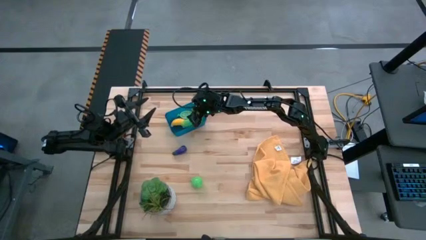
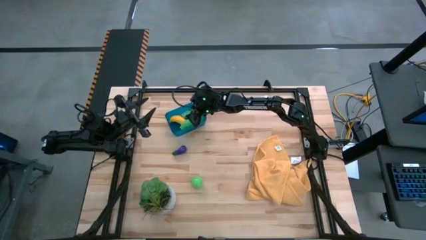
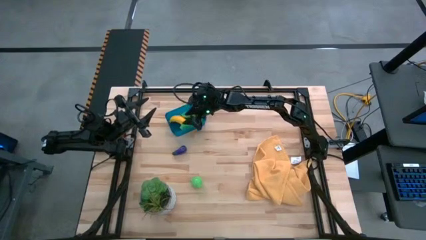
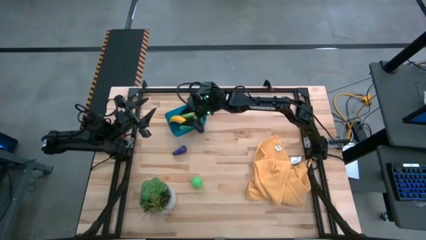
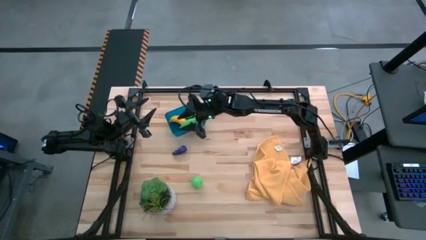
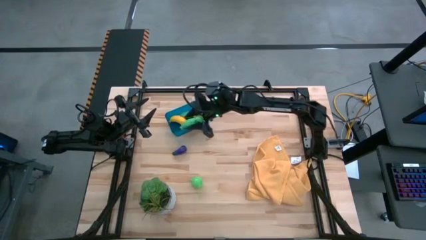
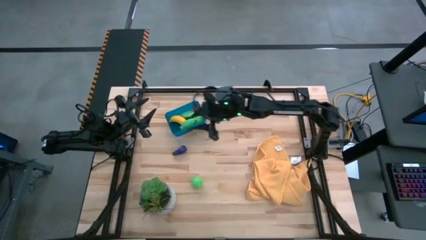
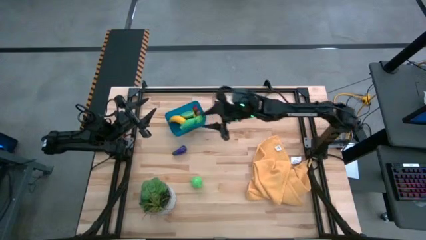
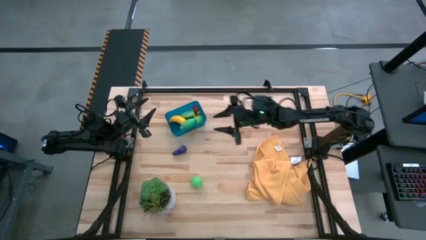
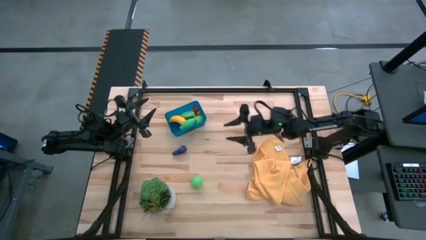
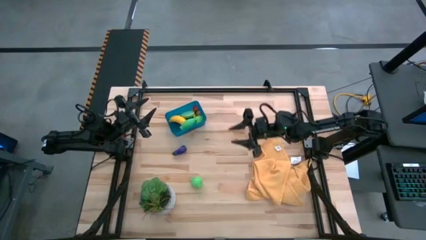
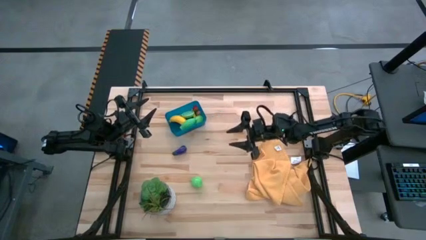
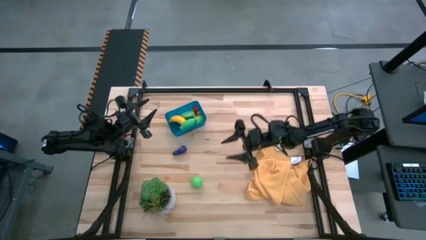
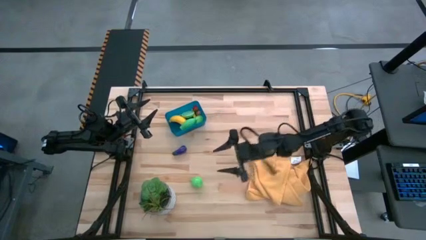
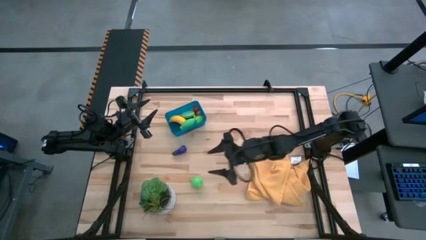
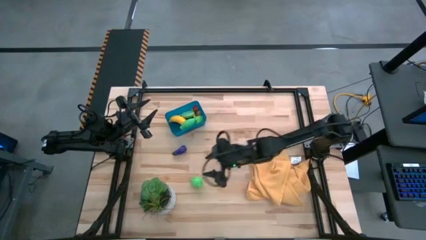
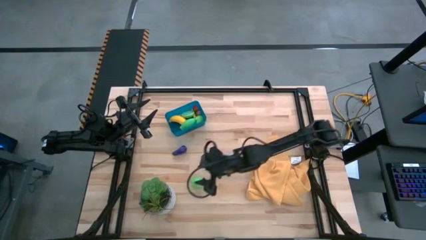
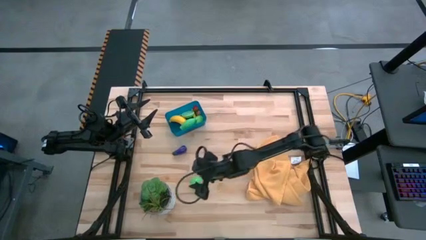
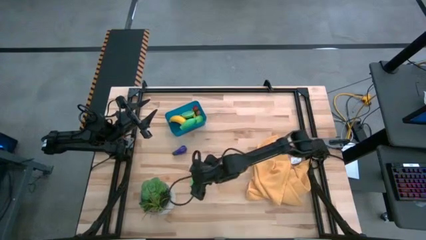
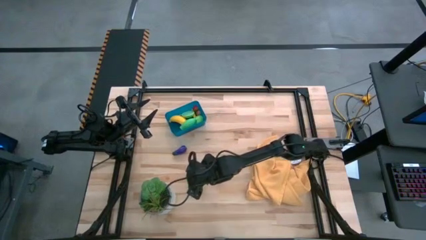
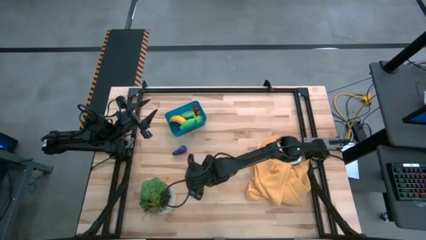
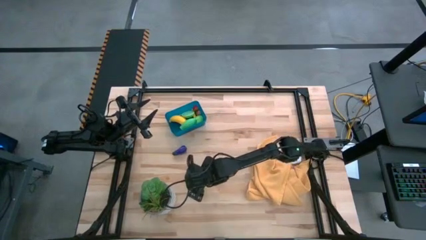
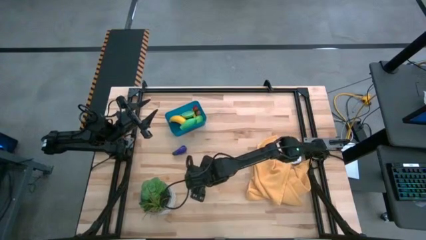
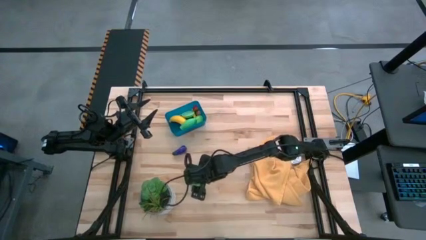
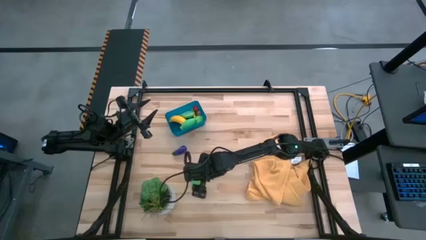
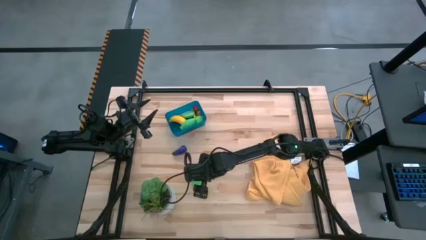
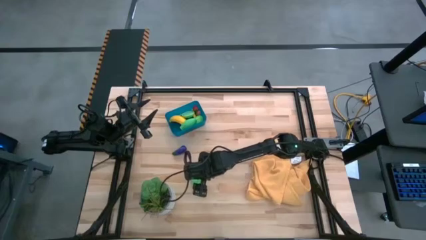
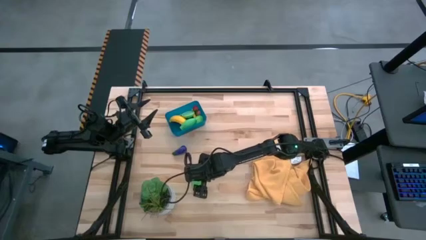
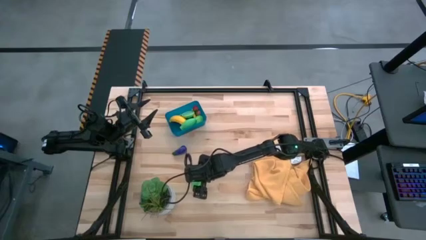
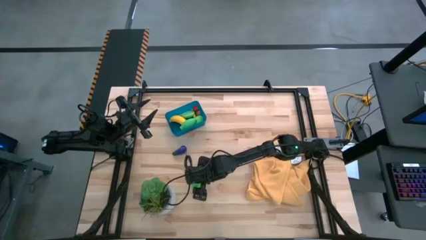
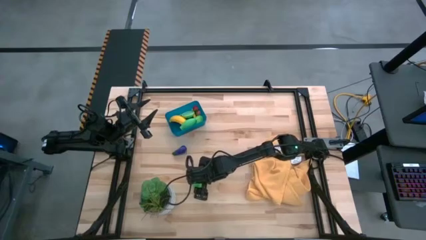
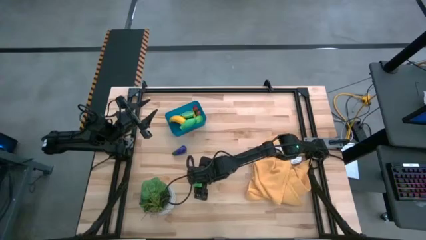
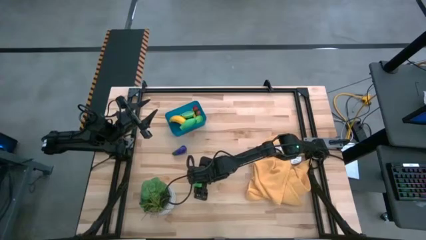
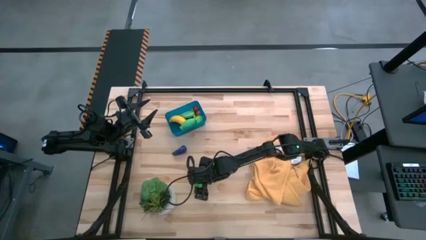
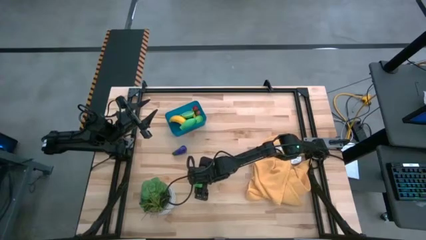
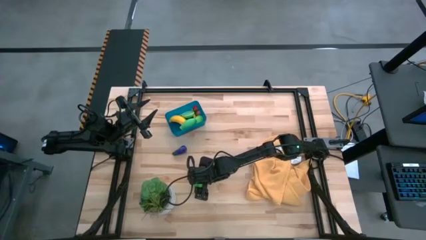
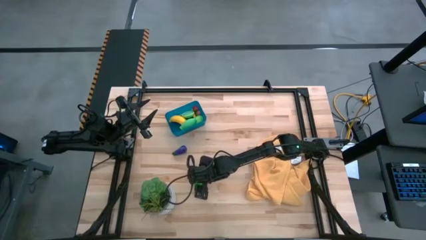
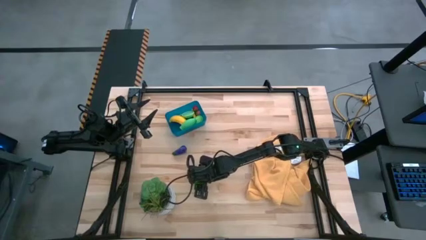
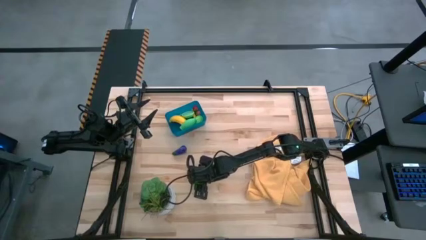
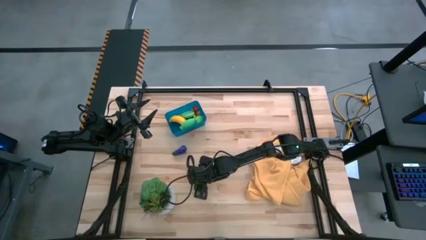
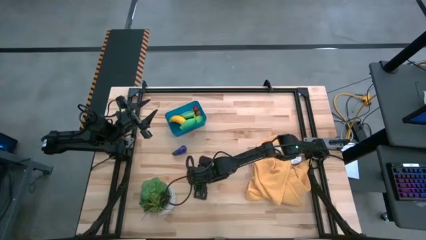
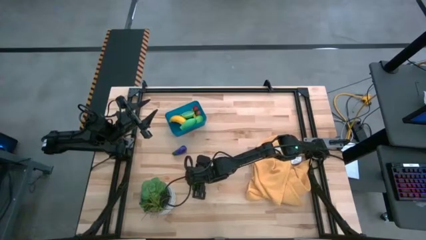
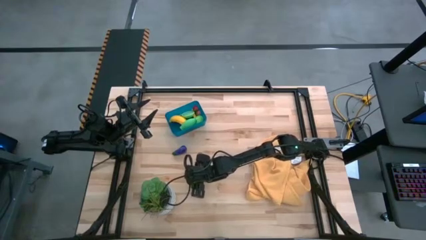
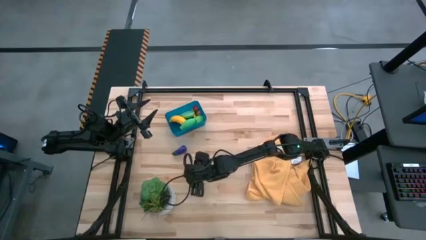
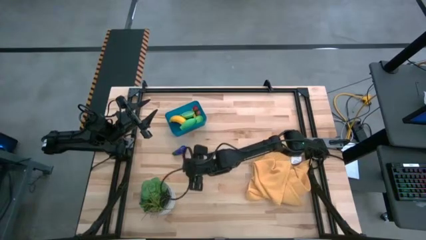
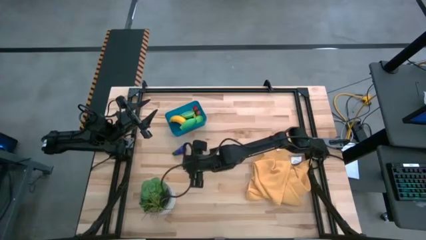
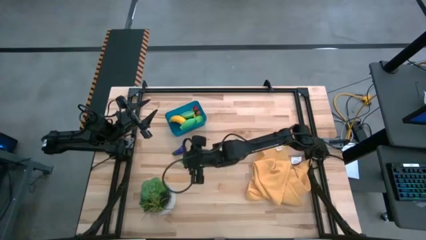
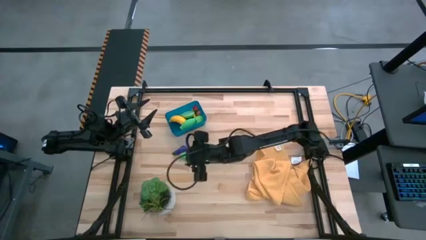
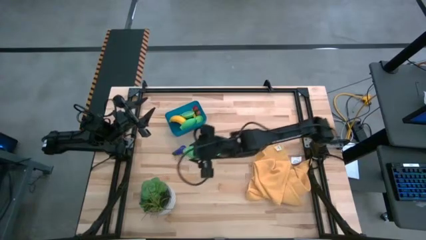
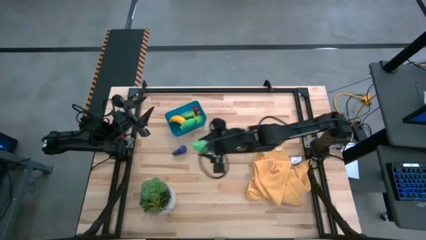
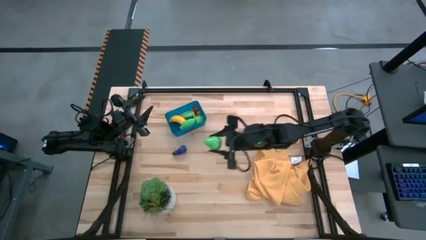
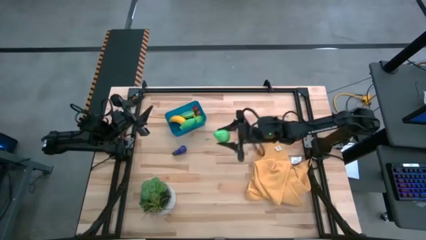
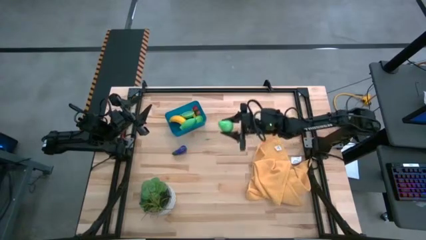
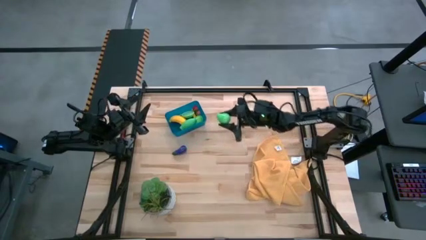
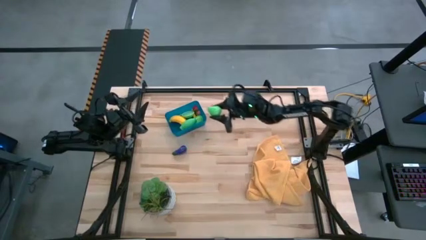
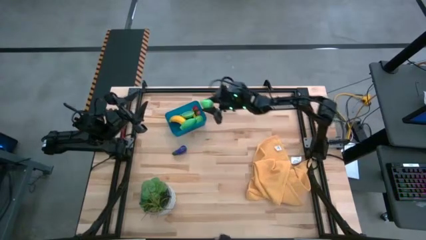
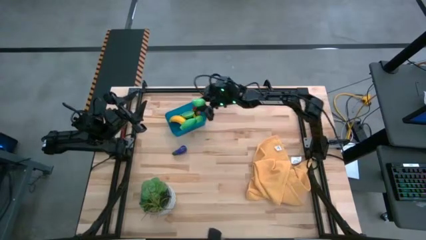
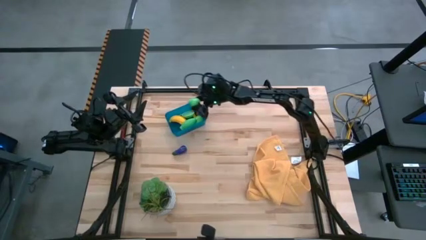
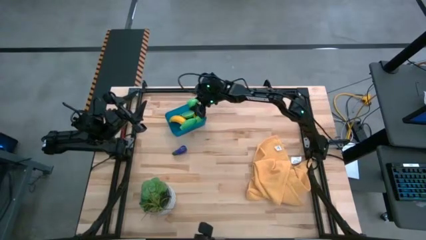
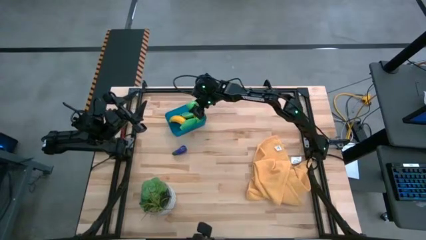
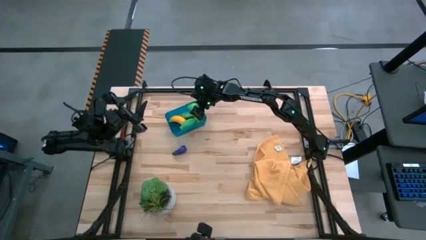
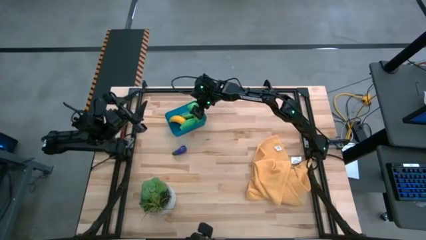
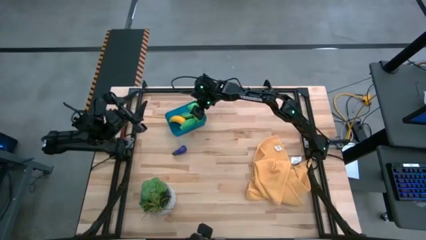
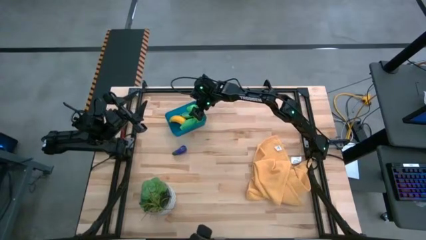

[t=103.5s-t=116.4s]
Task: Pick and placing Produce into tupperware
Put the pear into the blue bin

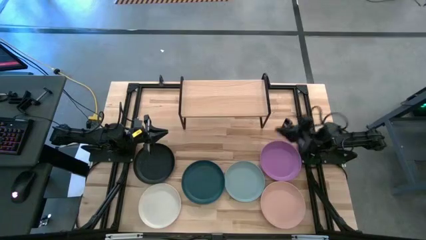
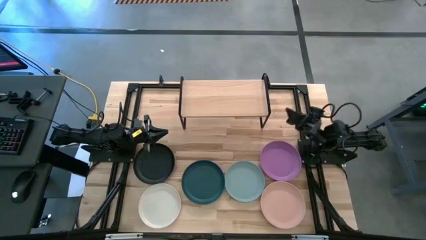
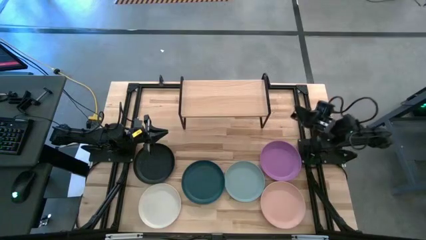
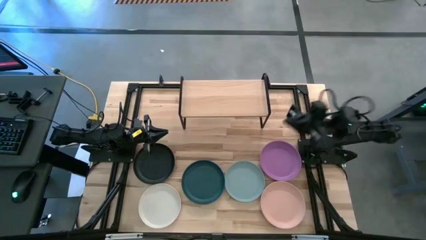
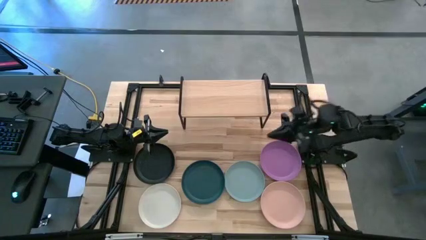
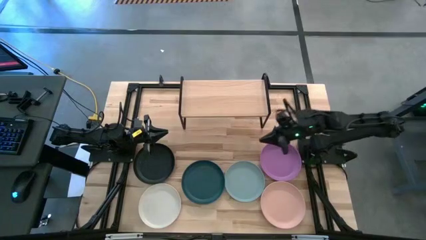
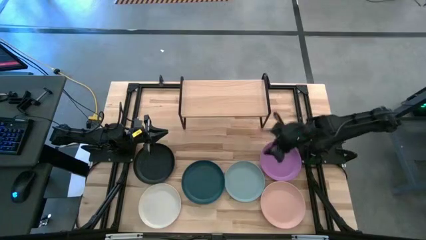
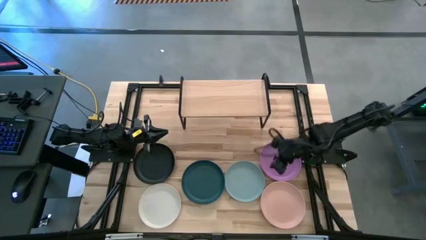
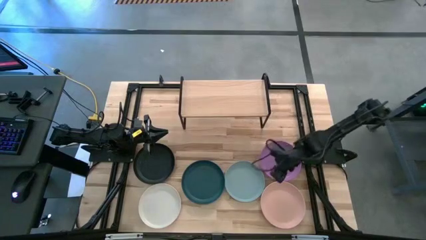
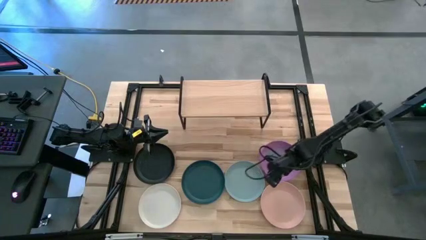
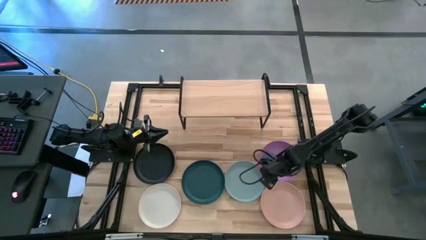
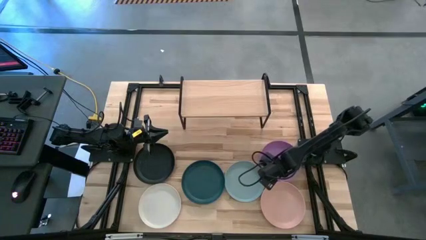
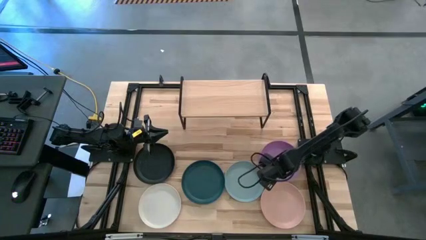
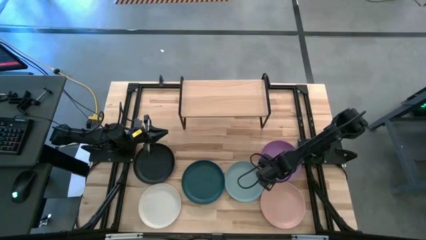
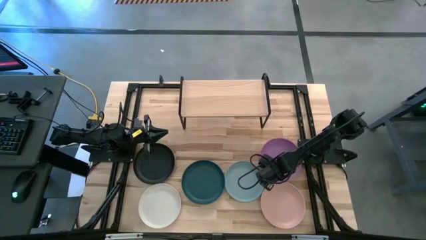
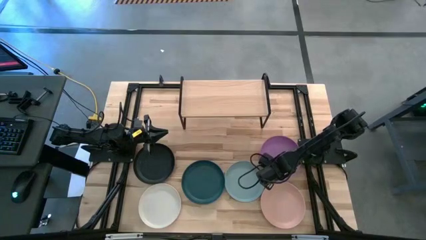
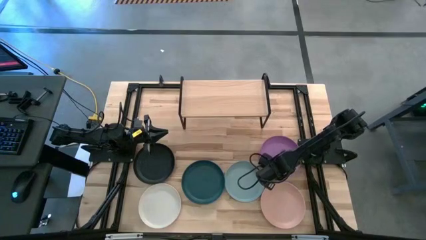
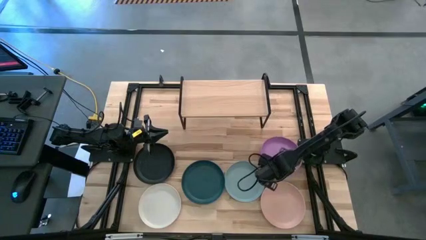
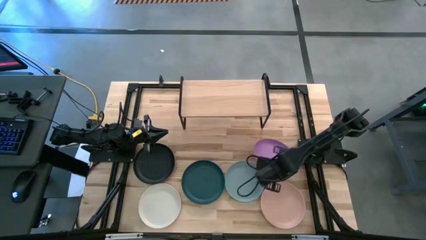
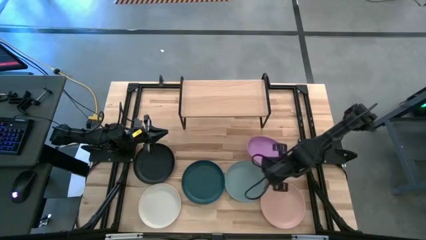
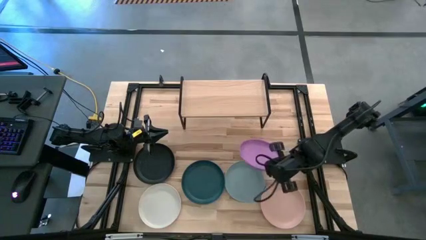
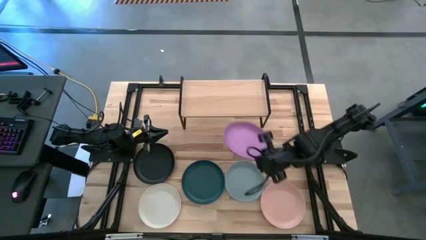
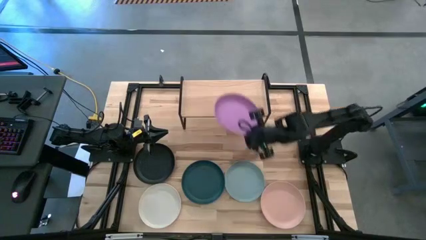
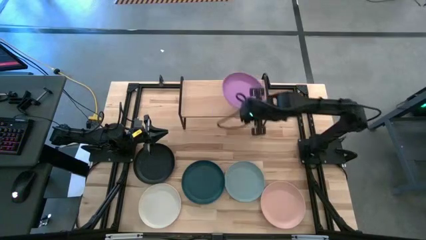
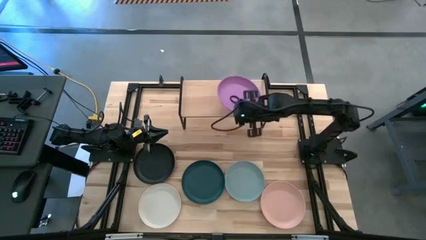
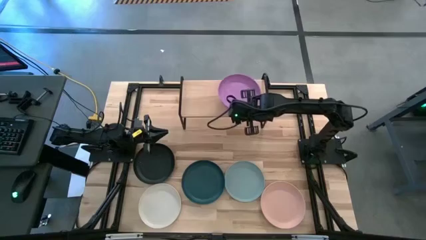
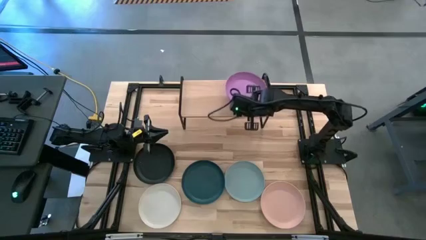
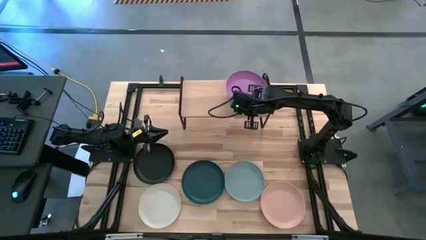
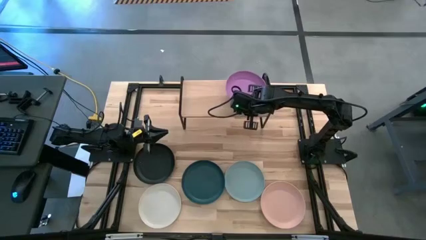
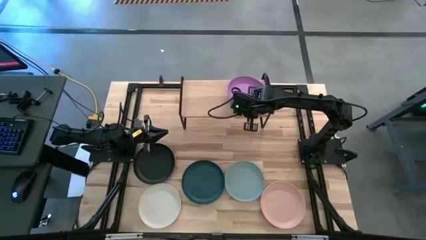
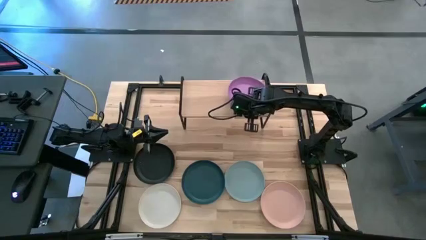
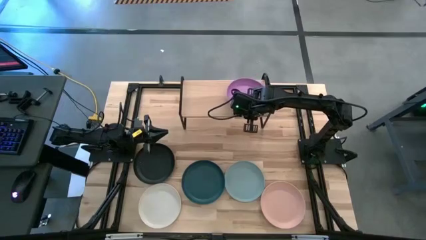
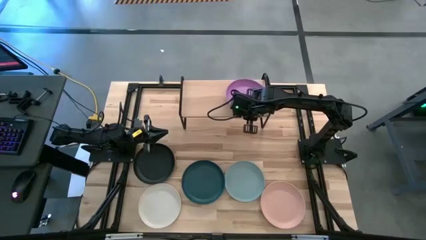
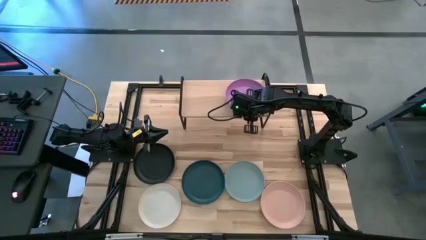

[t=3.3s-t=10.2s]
Task: Place and stack plates onto a shelf
Put the purple plate on the shelf
